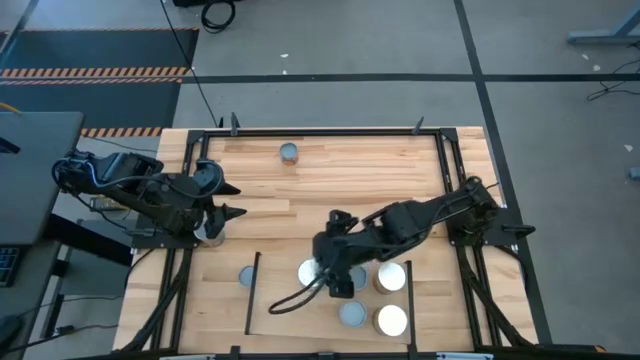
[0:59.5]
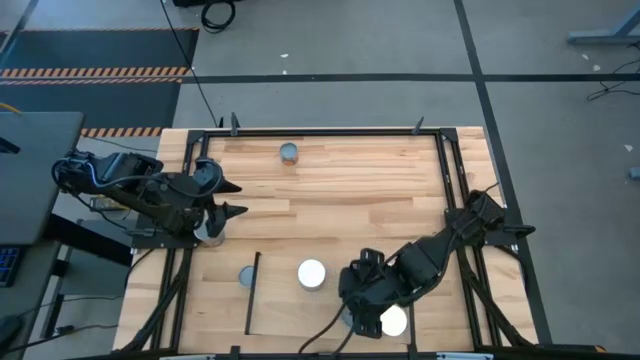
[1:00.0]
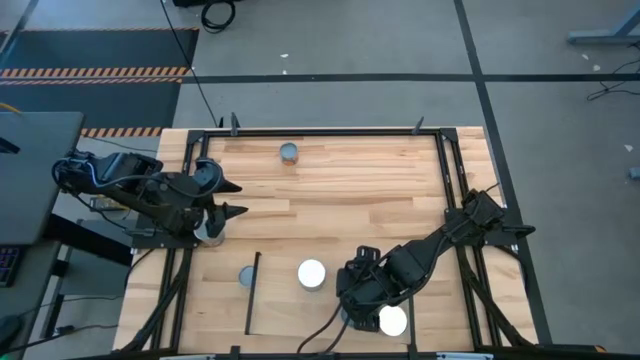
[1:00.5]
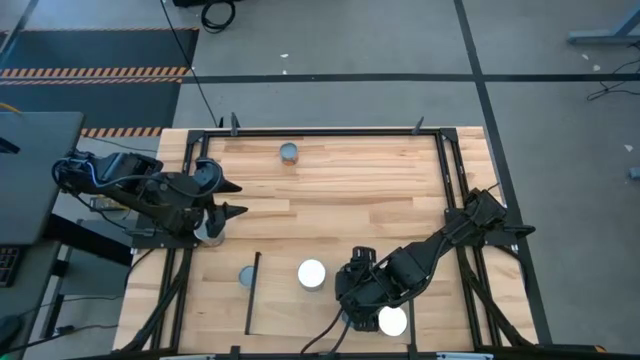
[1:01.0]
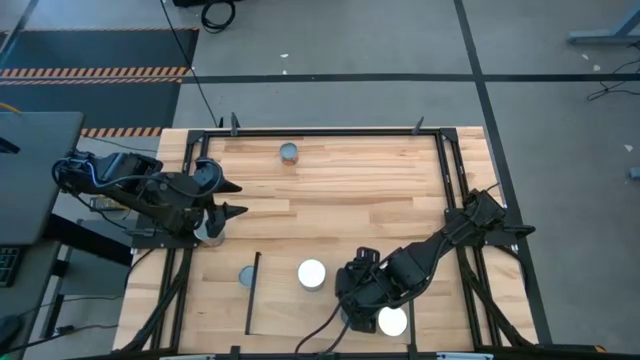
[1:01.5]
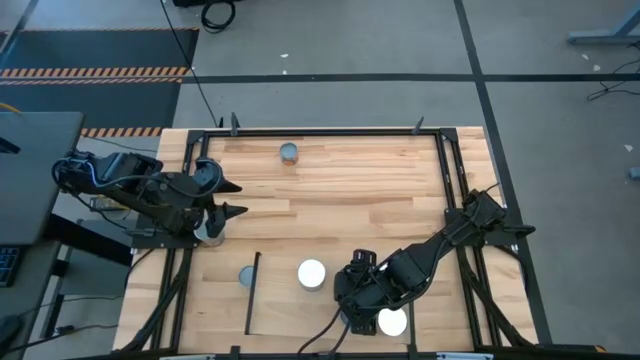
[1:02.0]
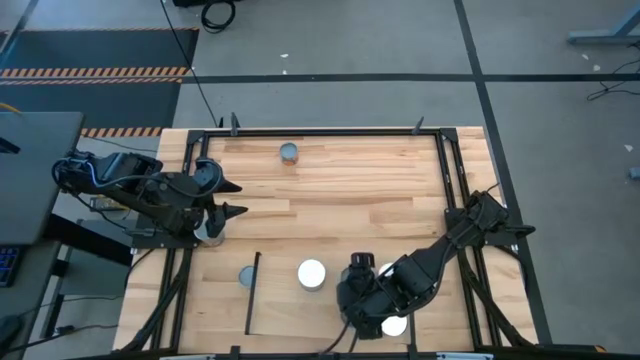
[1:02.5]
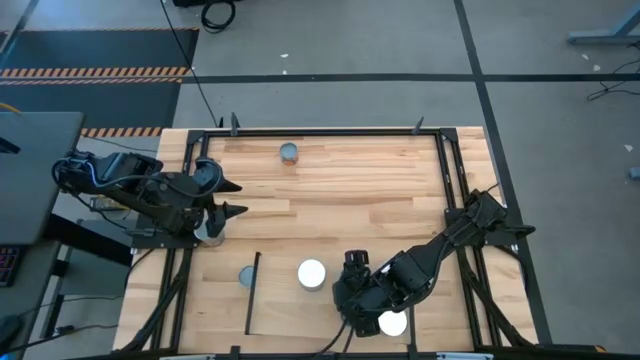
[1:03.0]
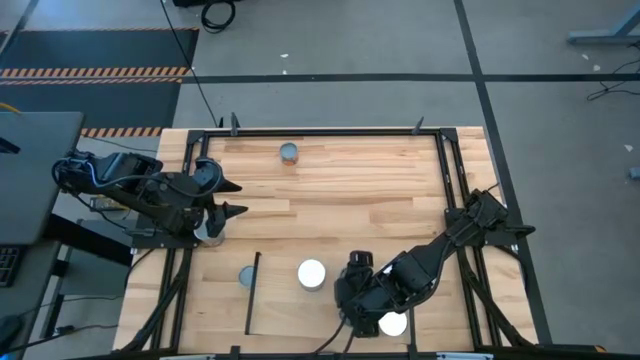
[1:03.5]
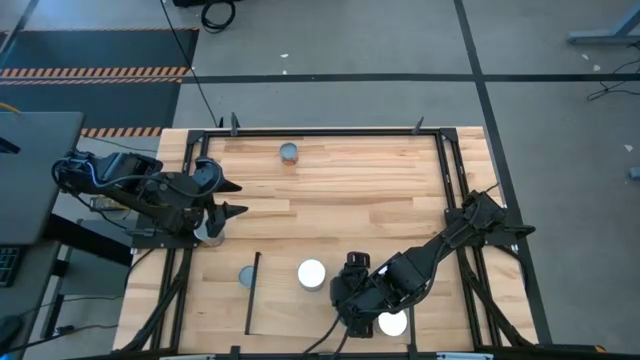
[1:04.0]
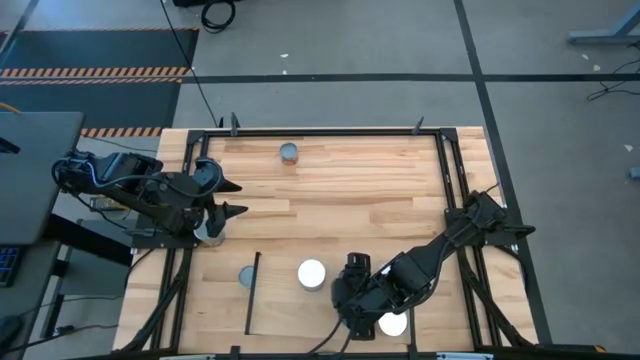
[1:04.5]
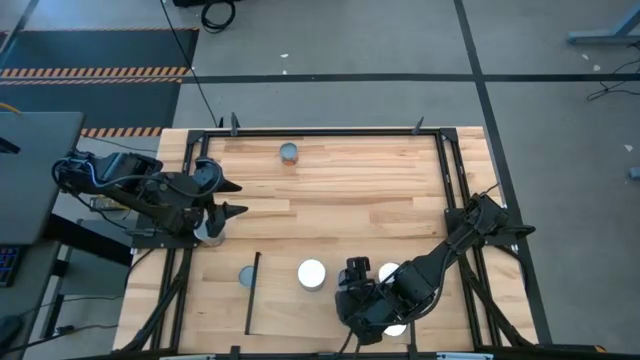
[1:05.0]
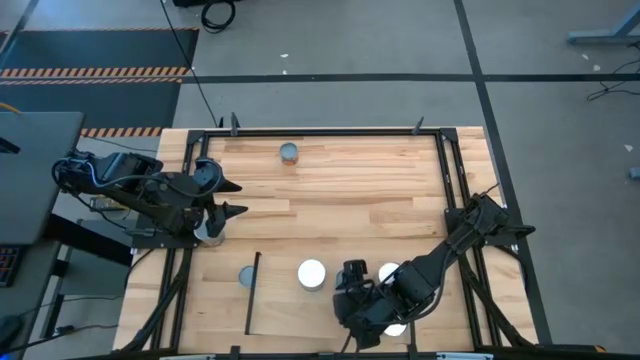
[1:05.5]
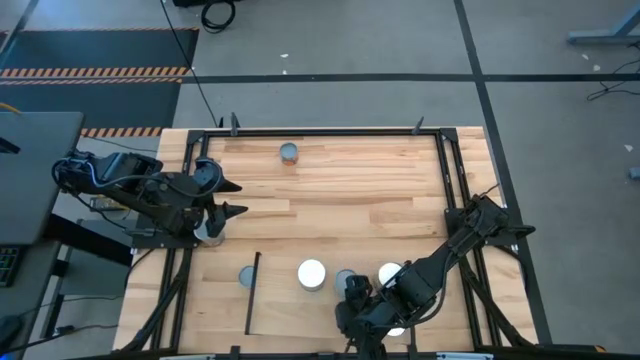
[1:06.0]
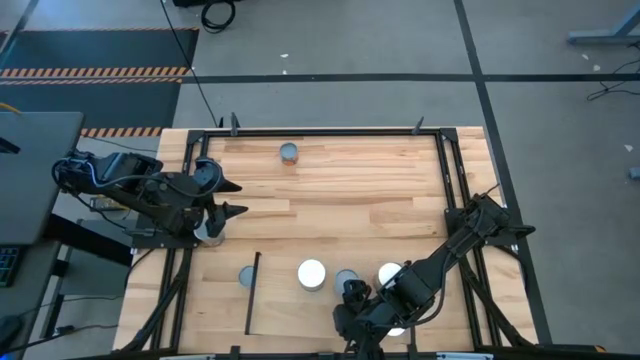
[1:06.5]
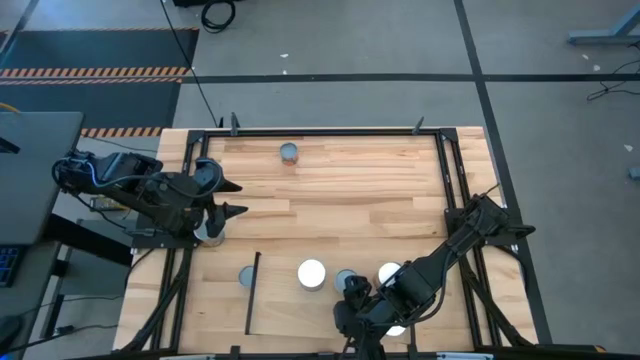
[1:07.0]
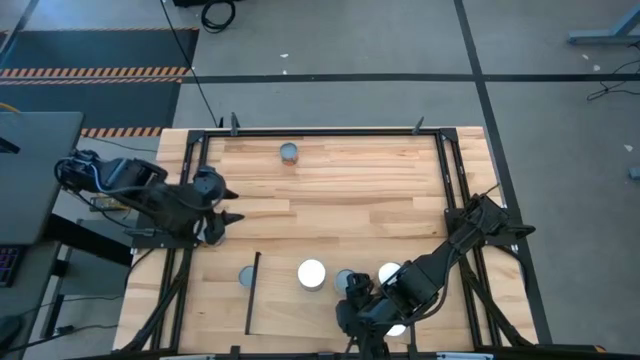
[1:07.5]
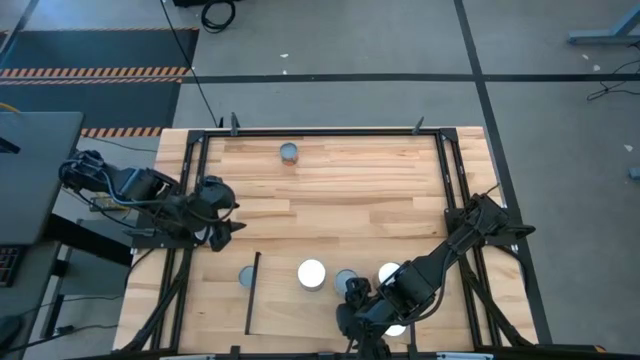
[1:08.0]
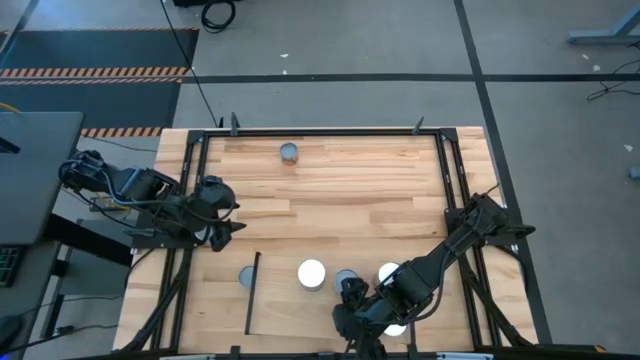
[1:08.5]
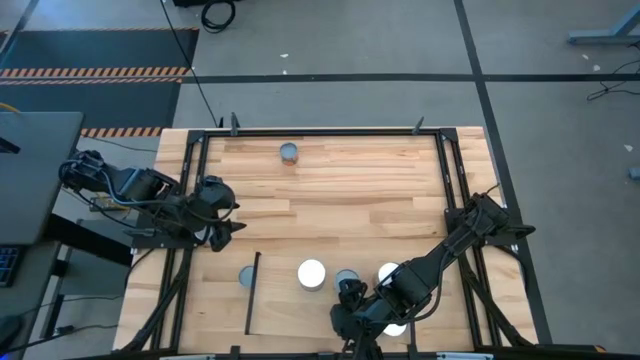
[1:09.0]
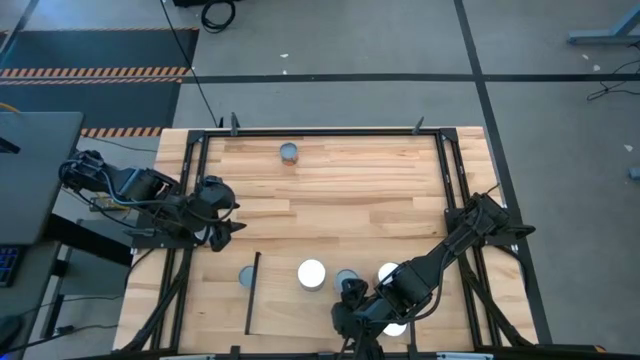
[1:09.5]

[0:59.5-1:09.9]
Task: Pick and place cans onto a shelf
Adjust the cans on the shelf

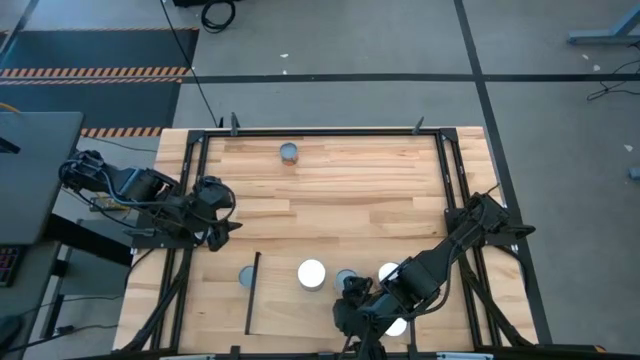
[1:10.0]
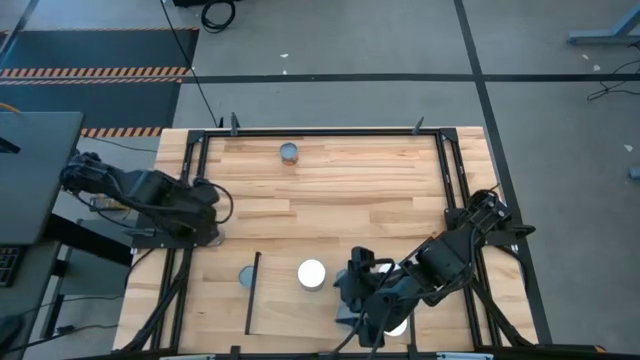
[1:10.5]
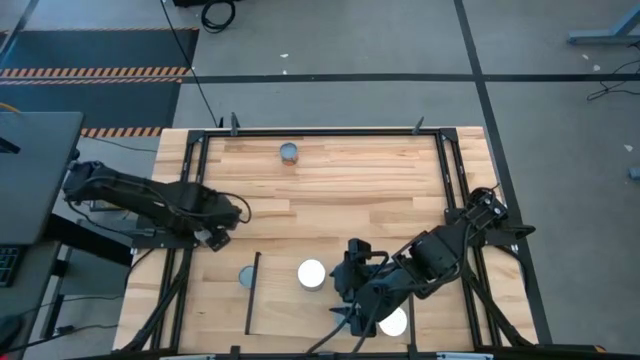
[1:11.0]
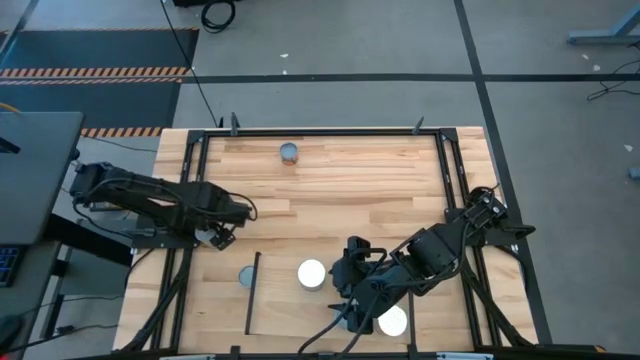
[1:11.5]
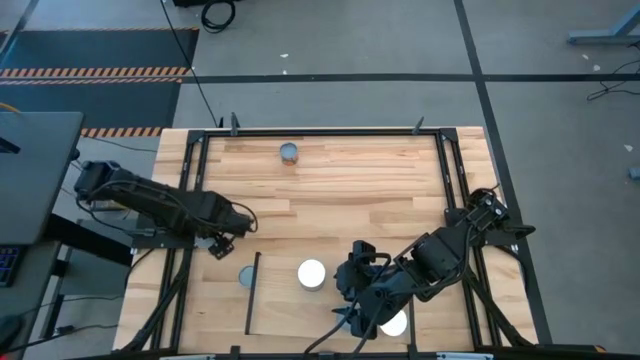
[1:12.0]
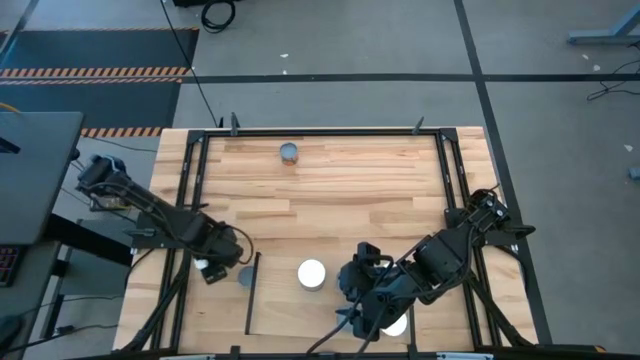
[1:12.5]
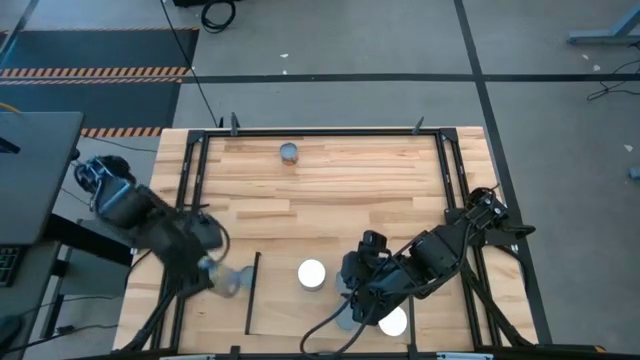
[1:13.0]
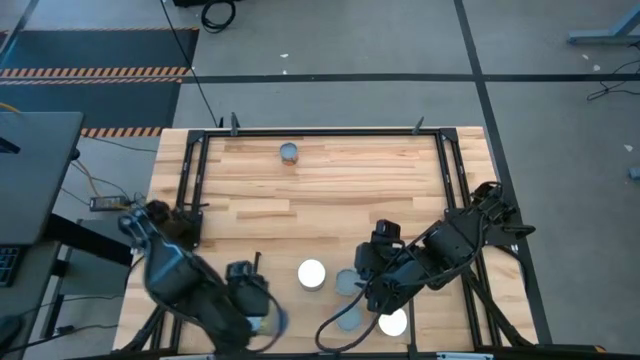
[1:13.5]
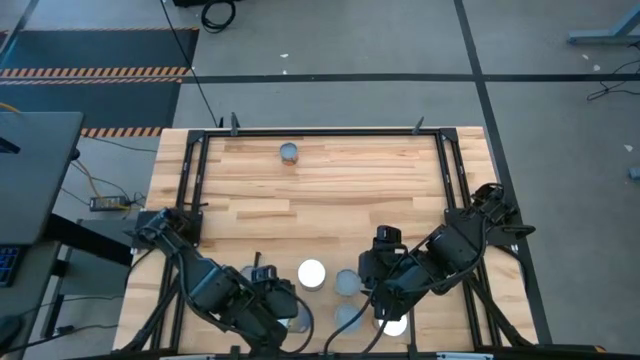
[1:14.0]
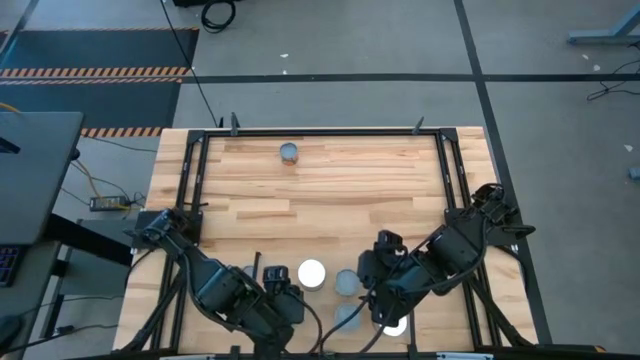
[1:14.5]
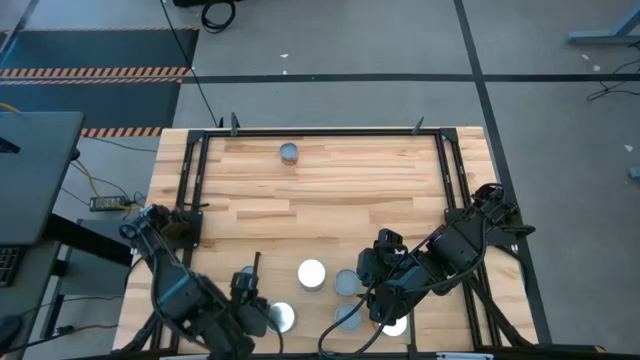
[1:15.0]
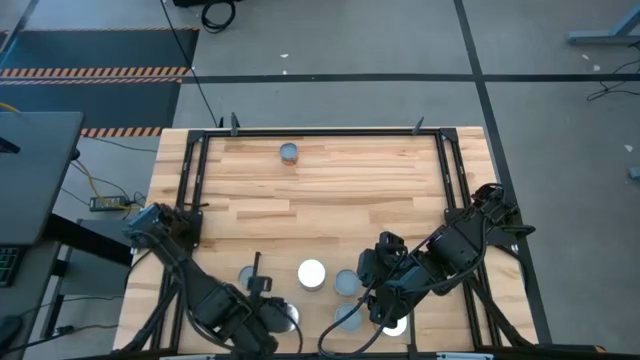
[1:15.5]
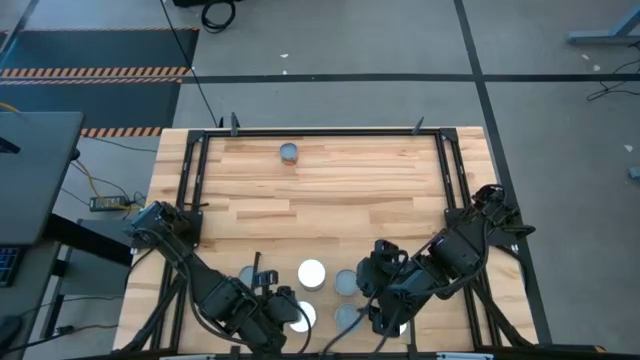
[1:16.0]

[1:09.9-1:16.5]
Put the canned peaches on the shelf

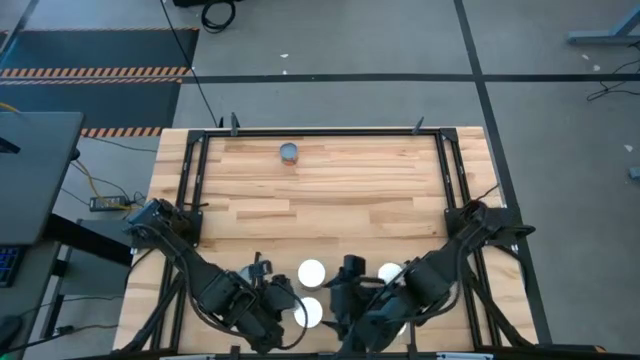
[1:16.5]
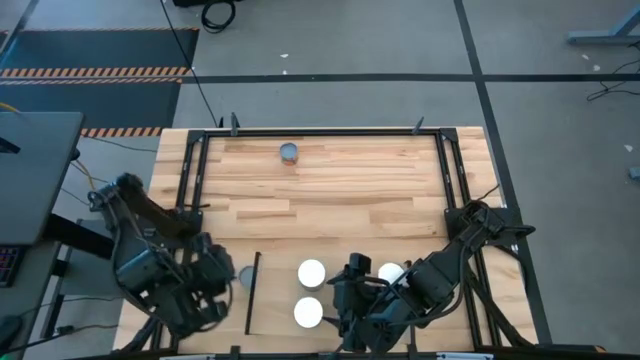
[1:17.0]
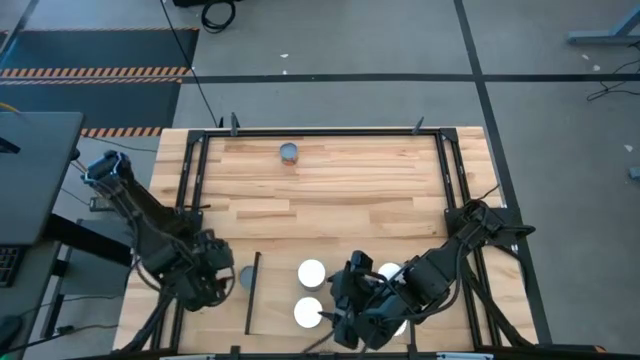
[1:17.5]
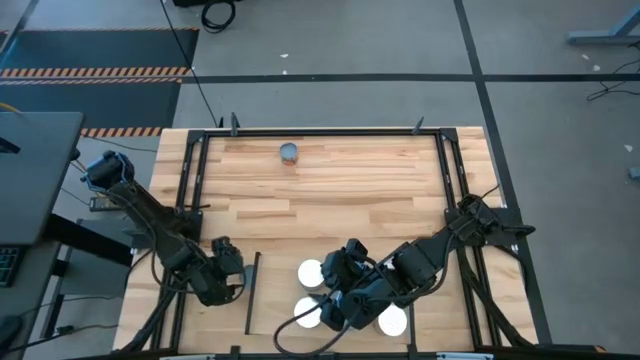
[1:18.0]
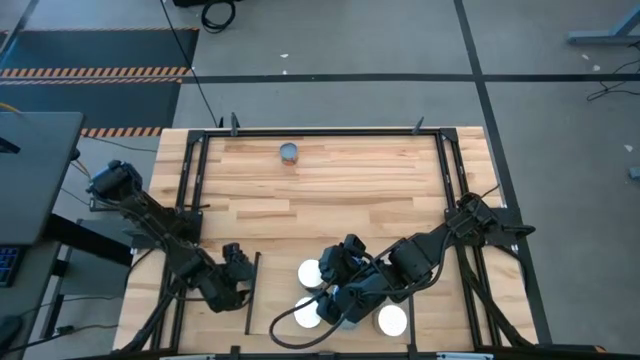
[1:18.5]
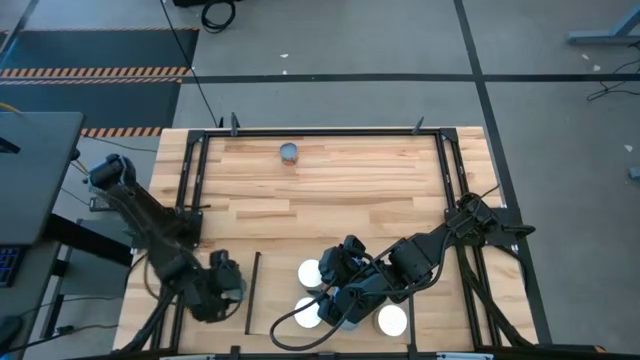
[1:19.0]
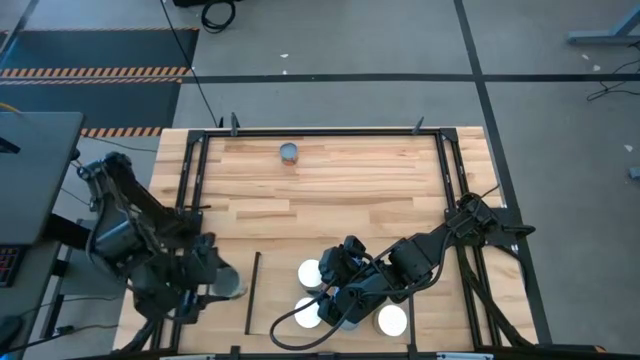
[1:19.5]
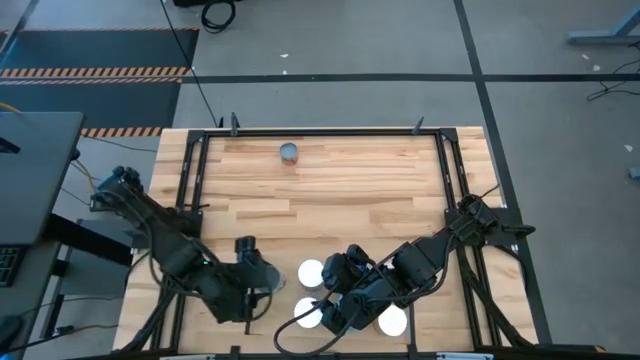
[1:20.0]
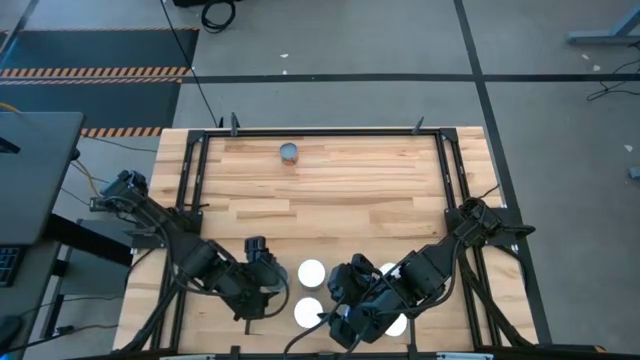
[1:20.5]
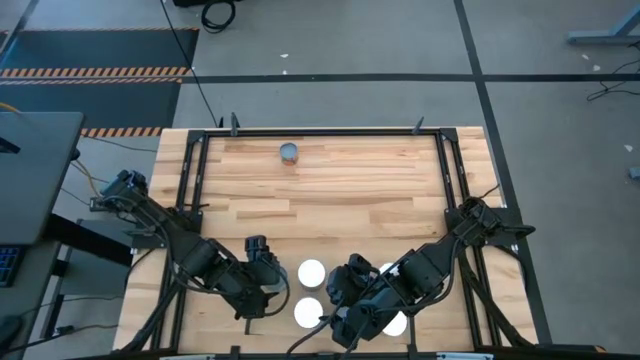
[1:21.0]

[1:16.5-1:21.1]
Put the canned peas on the shelf
